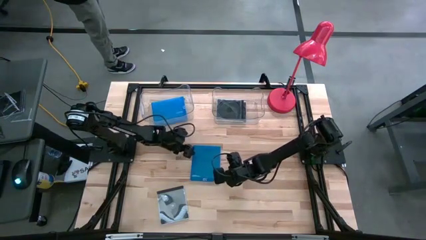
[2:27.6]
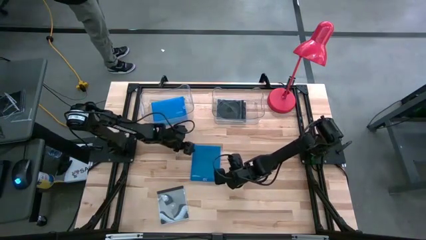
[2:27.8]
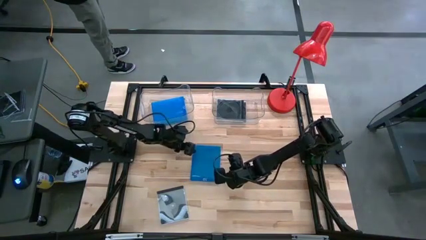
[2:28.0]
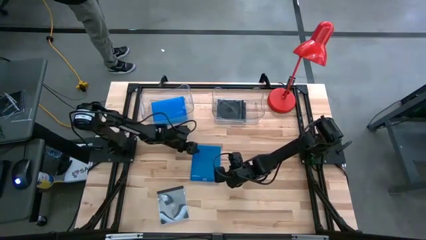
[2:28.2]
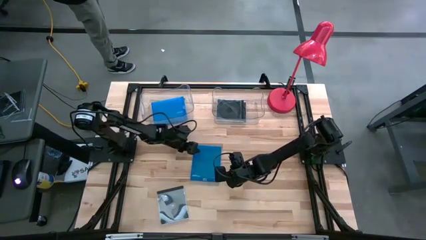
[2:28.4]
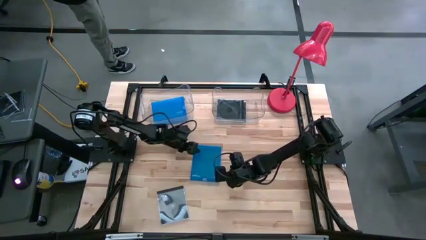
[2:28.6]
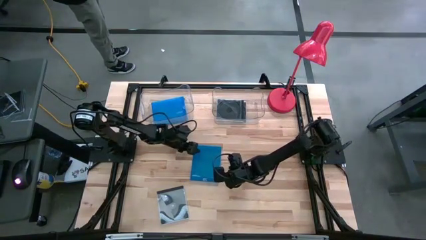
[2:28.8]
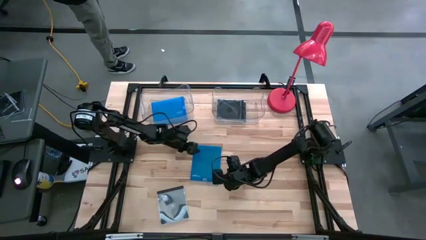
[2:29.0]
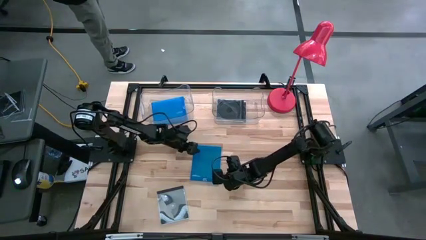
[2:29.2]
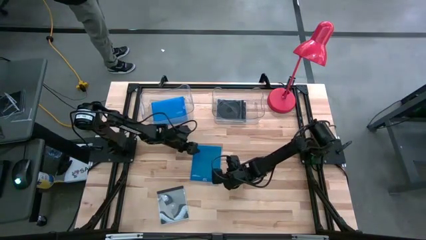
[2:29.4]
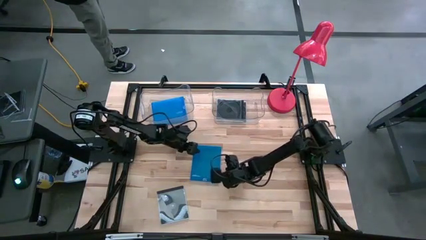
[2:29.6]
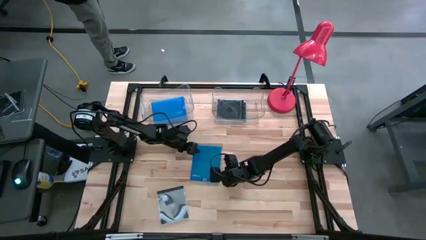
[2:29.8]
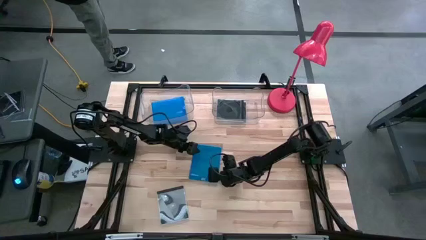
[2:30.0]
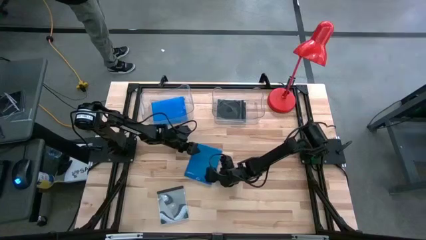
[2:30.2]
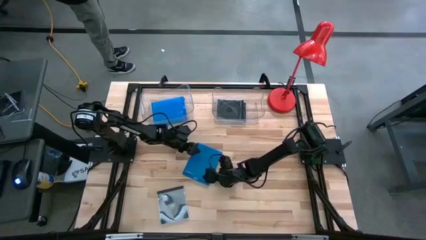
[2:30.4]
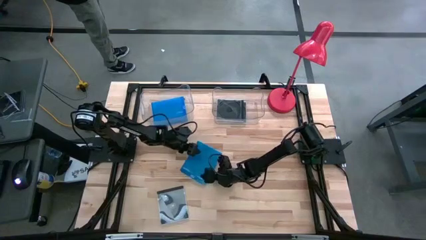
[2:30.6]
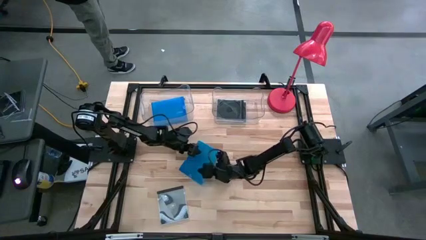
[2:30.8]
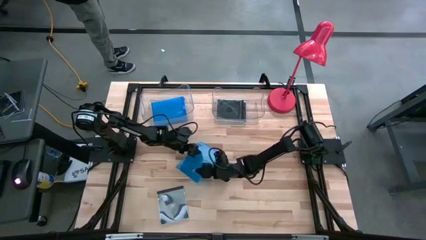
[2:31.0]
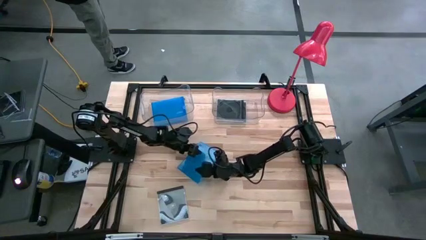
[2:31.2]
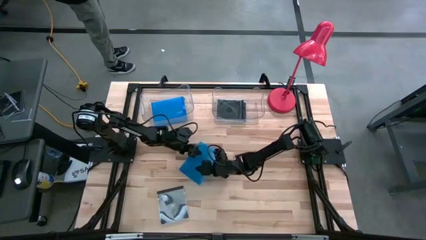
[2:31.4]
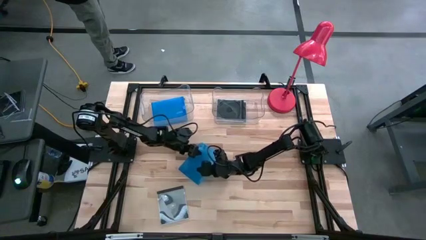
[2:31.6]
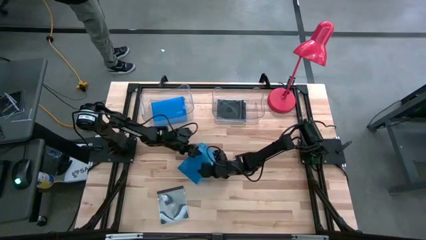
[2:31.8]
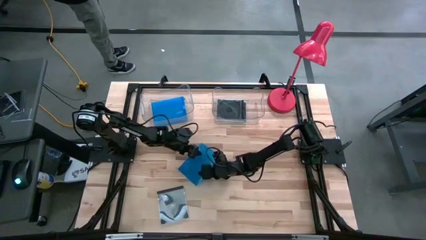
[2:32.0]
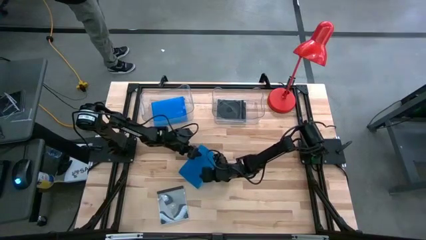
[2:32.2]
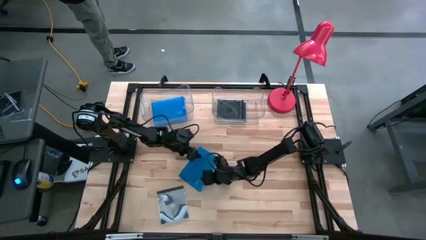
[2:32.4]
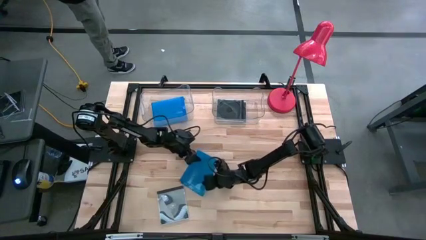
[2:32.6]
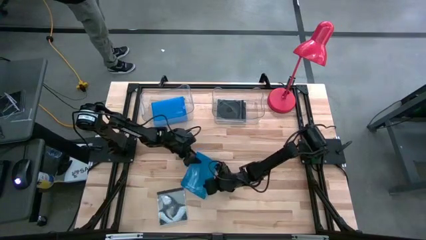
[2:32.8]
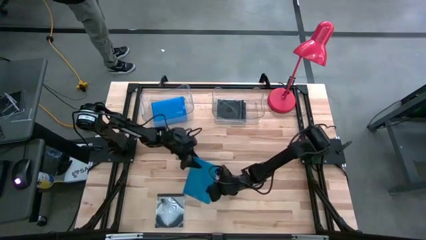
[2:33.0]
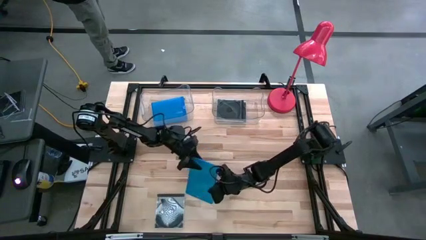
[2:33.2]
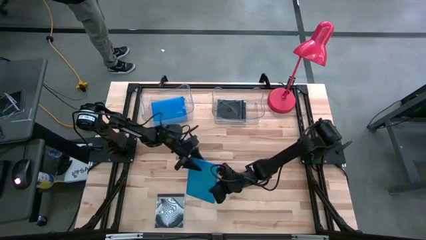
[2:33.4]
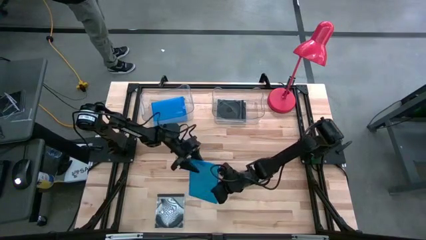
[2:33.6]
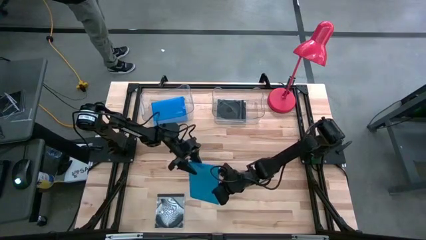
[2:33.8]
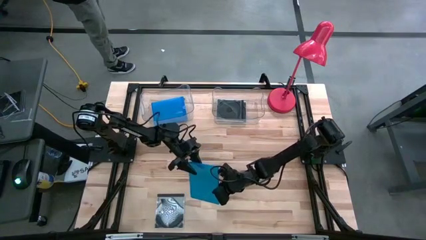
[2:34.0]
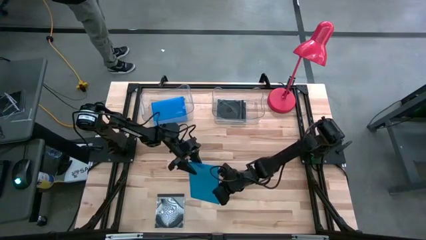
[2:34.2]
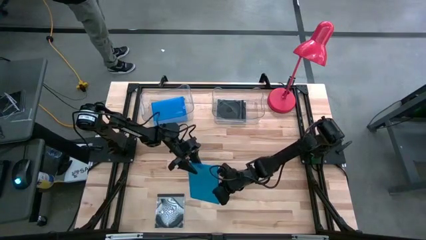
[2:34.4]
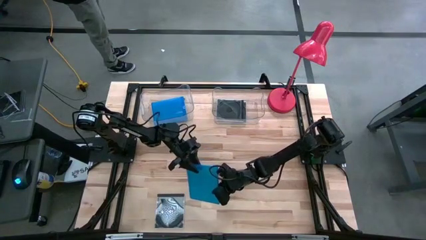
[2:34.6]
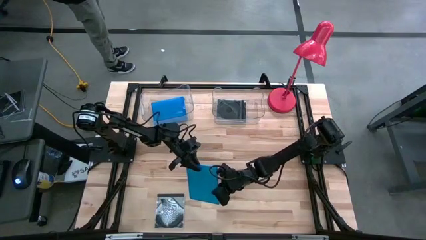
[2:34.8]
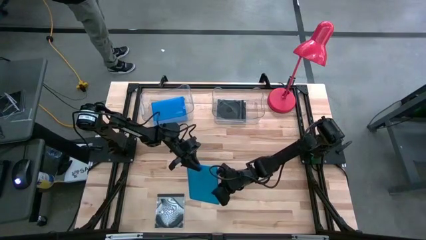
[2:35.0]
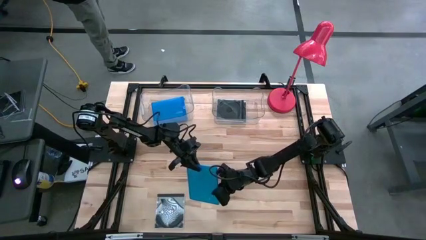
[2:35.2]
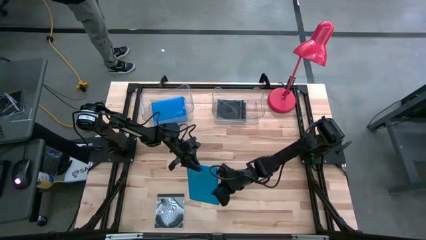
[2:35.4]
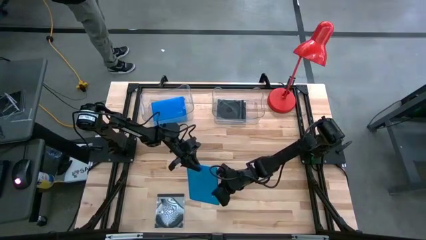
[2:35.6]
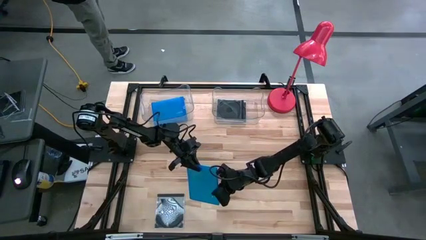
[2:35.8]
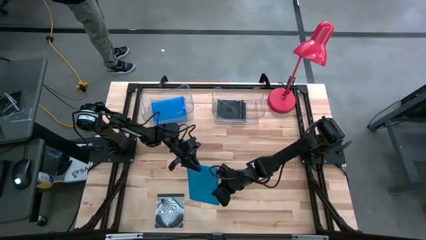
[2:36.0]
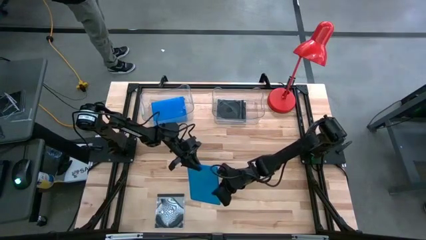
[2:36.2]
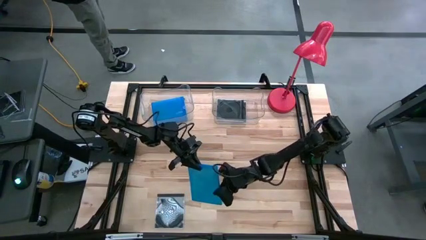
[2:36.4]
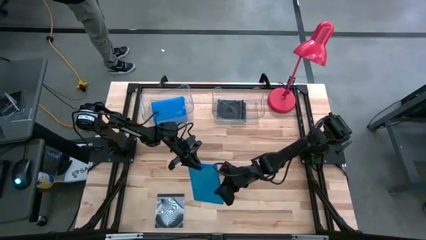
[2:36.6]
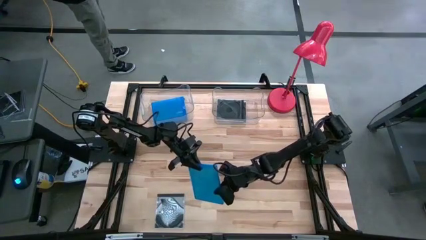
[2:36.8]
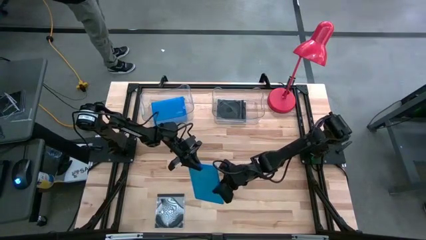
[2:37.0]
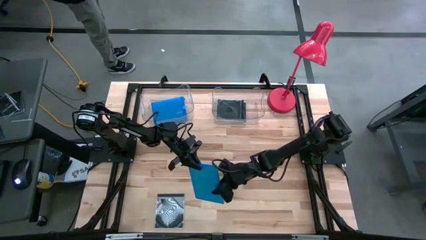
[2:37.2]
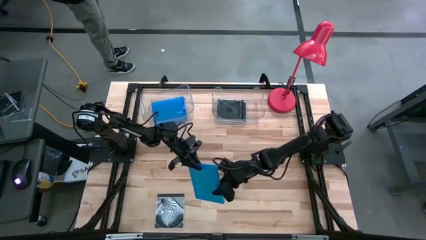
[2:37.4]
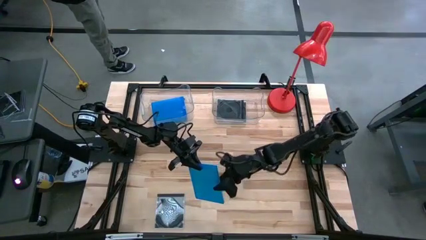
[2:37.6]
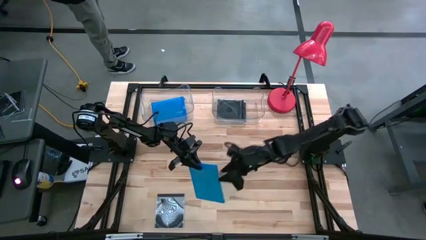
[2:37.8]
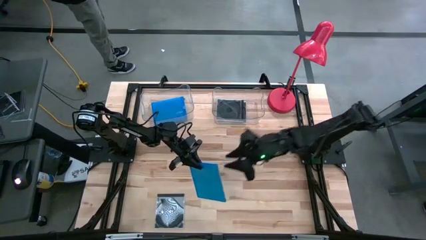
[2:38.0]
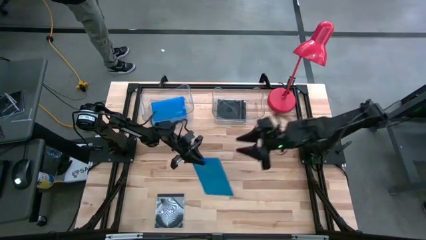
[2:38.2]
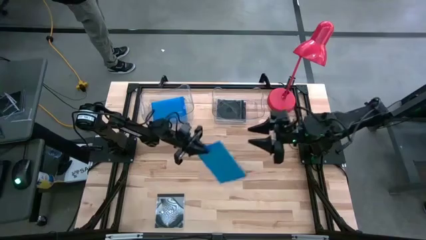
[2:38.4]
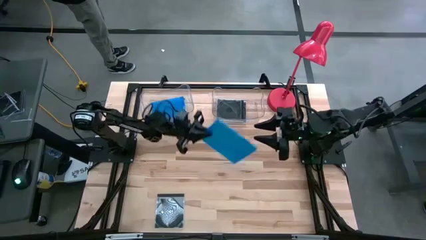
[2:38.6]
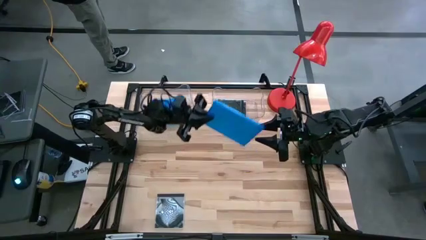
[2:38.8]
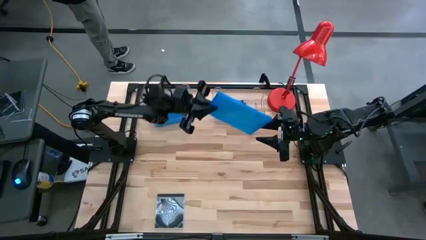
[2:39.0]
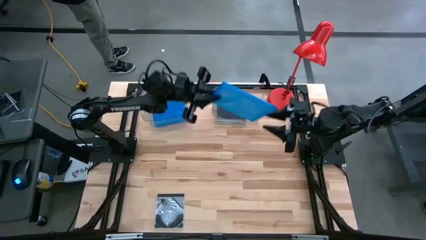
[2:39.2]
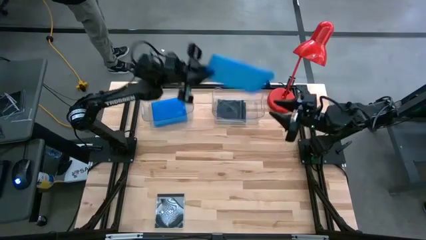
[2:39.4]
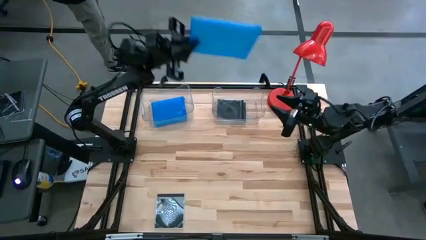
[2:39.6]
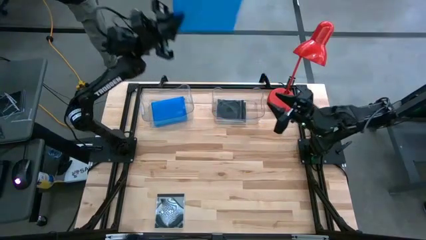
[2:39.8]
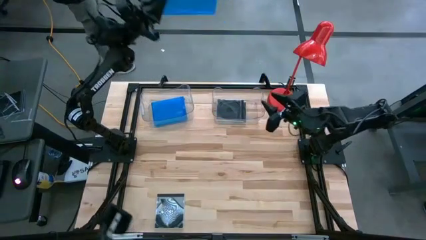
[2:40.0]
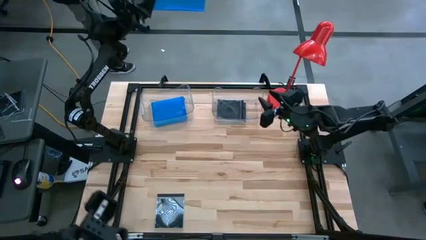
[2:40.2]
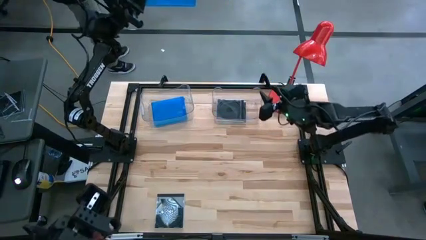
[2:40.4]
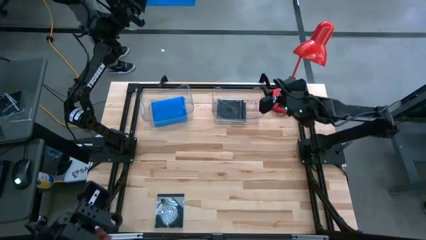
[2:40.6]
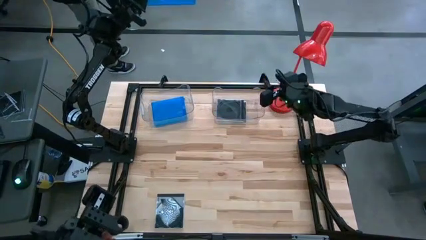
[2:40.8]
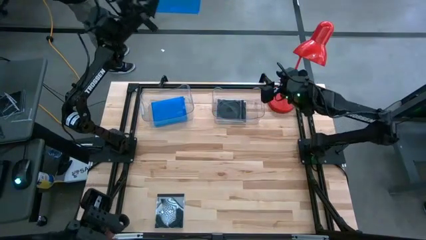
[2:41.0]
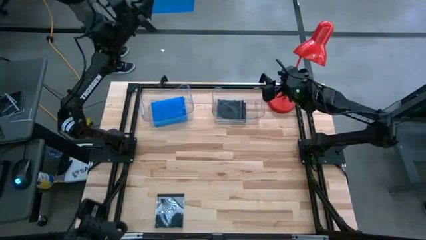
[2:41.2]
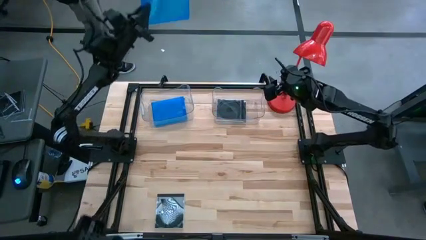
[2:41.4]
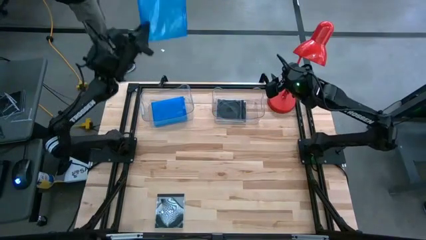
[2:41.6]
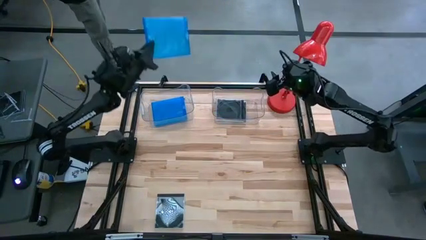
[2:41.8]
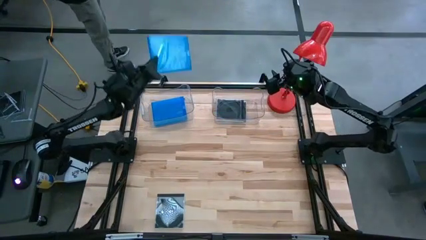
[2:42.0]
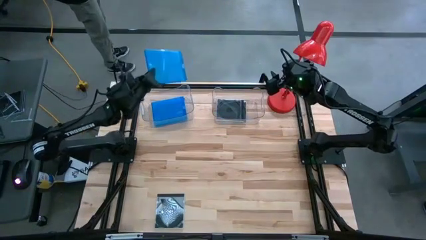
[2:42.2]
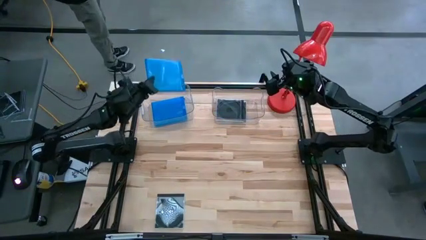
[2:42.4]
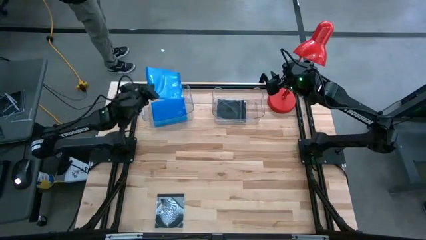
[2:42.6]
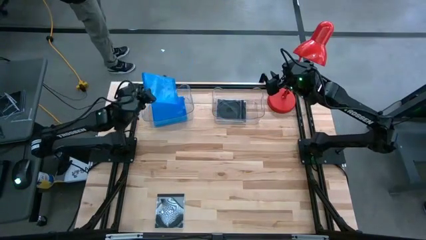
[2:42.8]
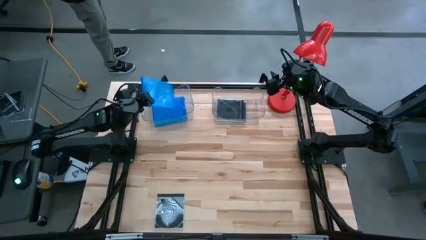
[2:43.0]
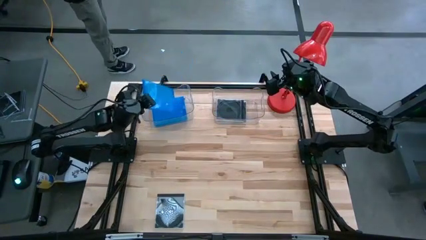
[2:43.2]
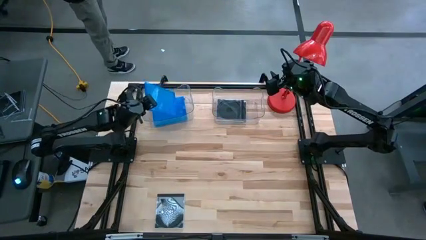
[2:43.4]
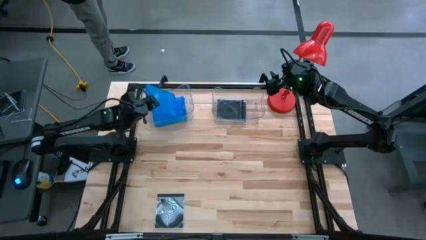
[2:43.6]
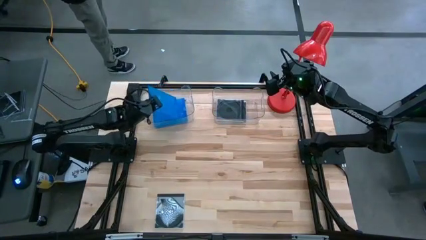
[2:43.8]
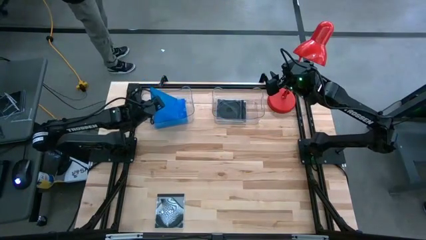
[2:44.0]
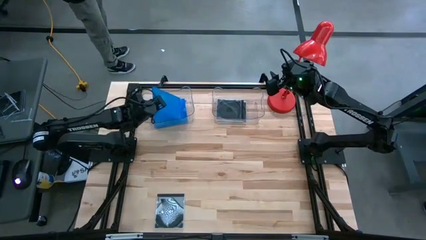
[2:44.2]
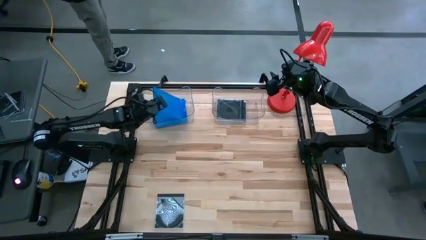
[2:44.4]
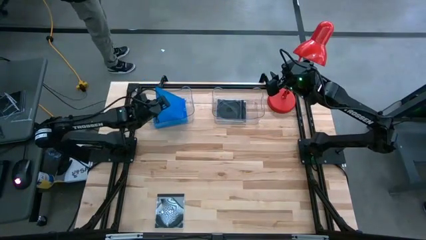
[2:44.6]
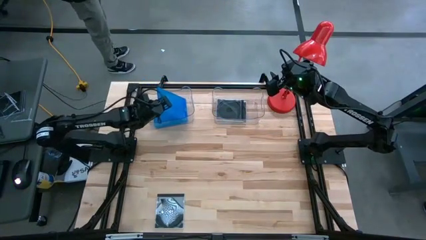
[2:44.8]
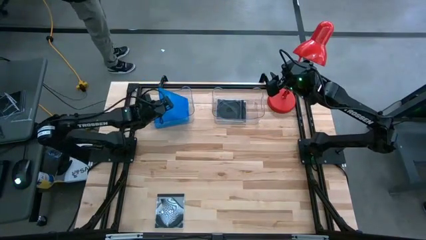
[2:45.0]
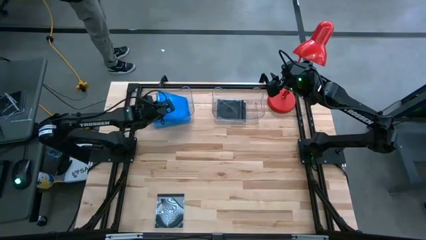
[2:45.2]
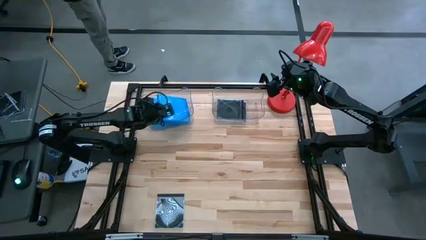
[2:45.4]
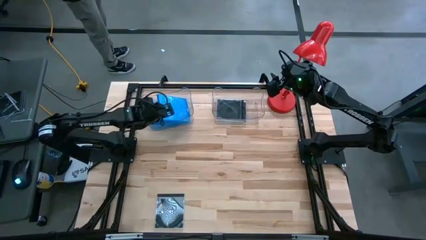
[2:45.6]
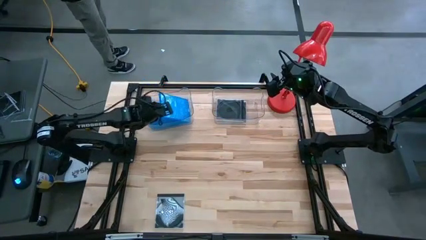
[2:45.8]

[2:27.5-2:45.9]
Task: Pick & place jewel cases by type
Put the blue CD case into the left transparent bin
